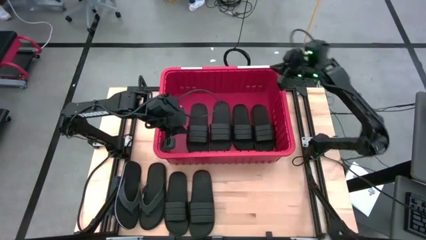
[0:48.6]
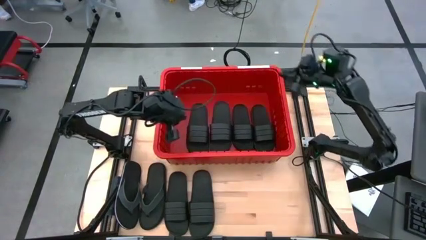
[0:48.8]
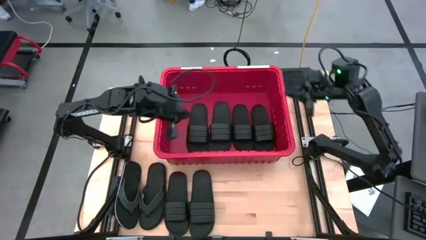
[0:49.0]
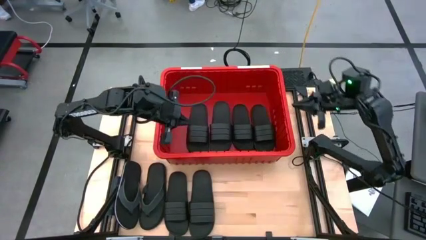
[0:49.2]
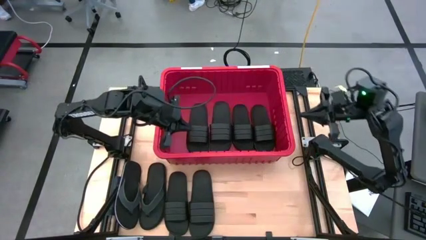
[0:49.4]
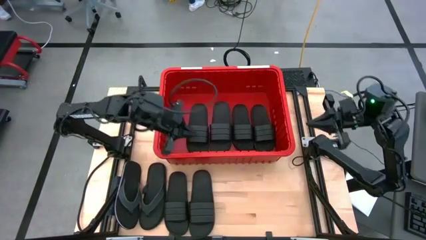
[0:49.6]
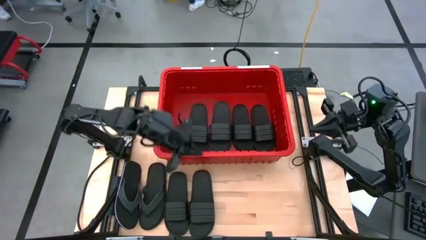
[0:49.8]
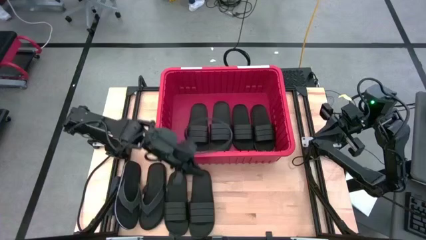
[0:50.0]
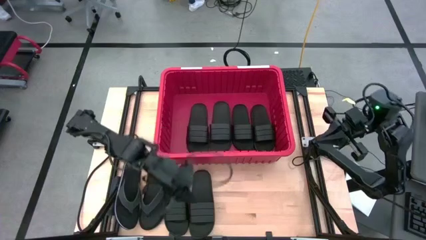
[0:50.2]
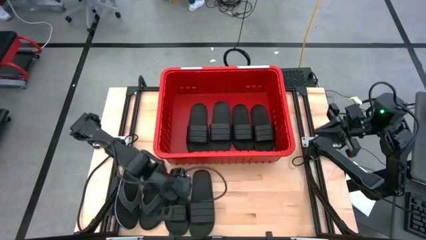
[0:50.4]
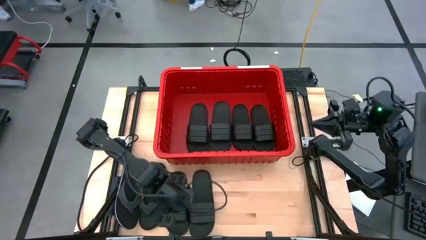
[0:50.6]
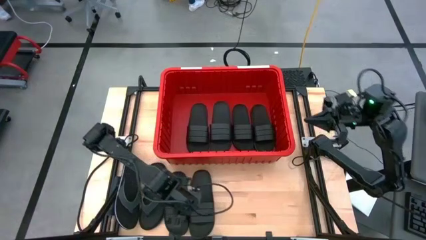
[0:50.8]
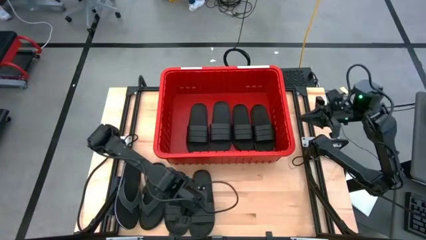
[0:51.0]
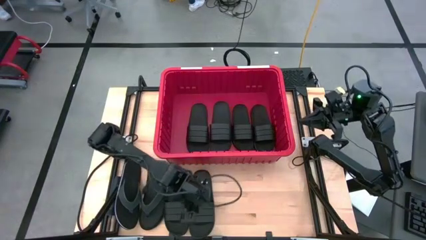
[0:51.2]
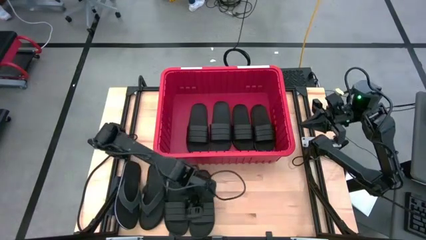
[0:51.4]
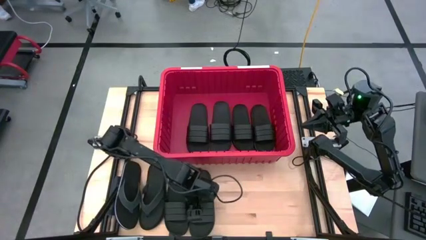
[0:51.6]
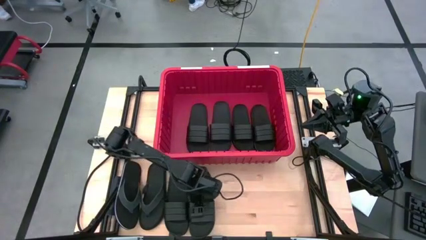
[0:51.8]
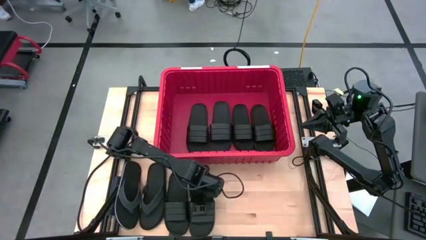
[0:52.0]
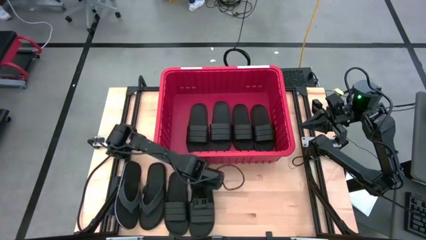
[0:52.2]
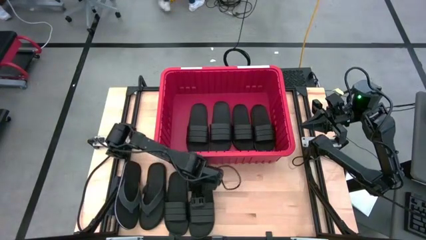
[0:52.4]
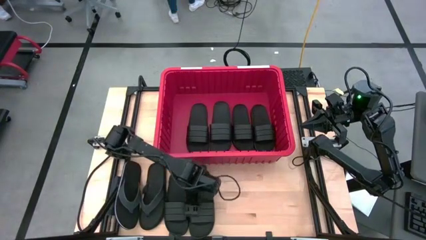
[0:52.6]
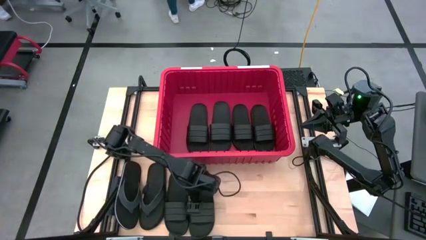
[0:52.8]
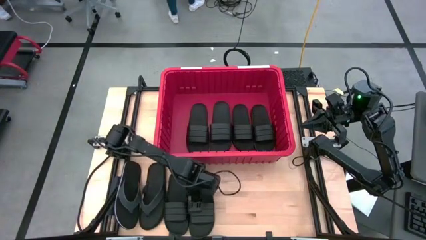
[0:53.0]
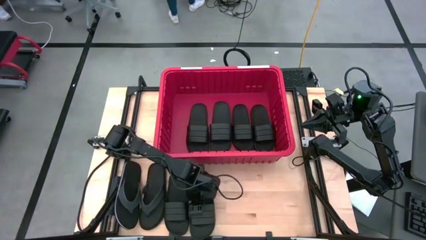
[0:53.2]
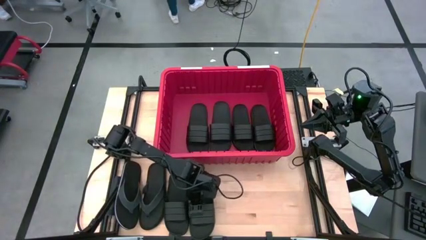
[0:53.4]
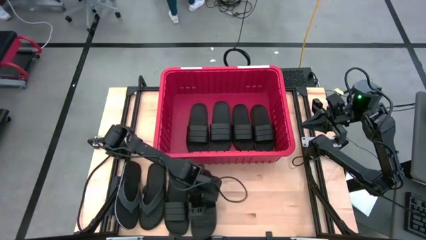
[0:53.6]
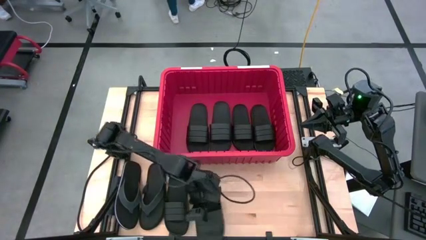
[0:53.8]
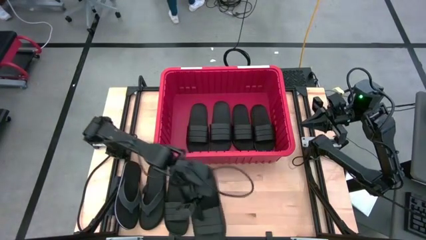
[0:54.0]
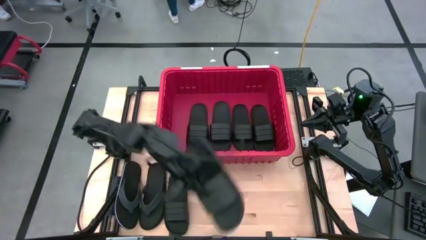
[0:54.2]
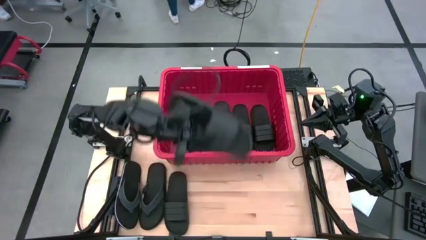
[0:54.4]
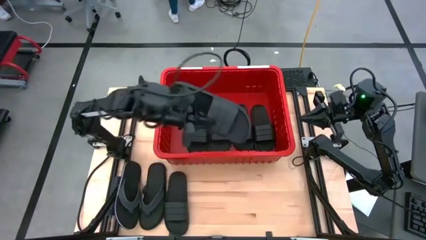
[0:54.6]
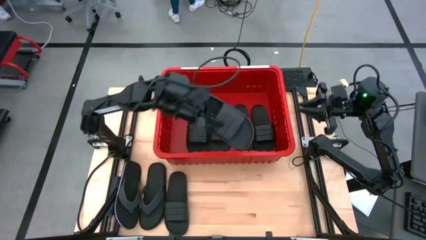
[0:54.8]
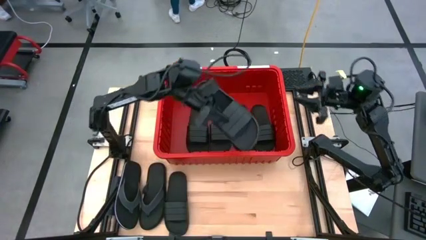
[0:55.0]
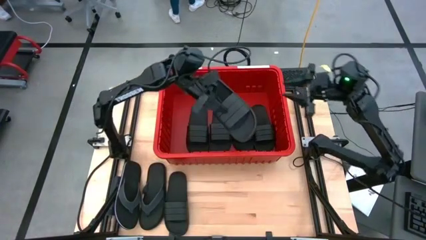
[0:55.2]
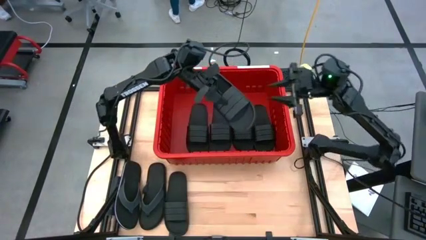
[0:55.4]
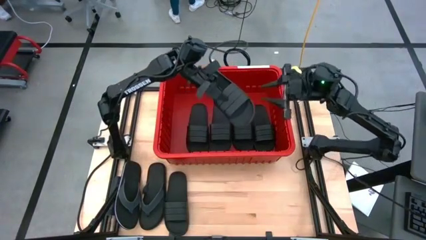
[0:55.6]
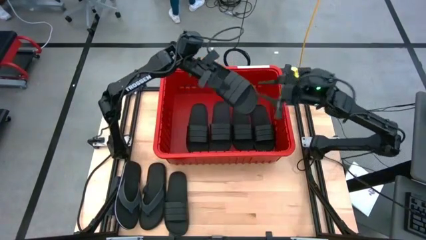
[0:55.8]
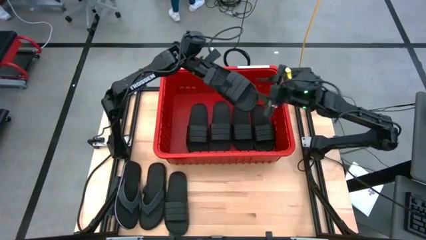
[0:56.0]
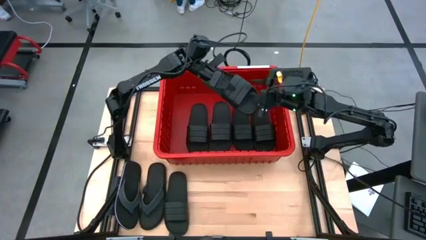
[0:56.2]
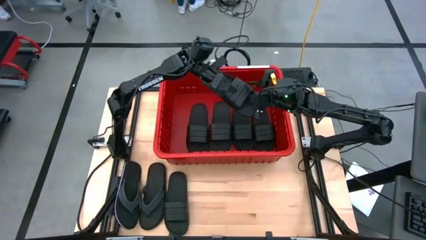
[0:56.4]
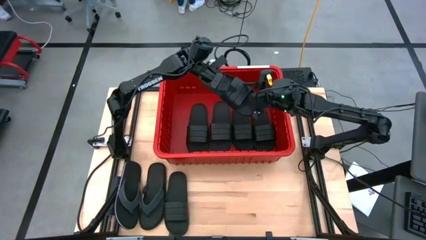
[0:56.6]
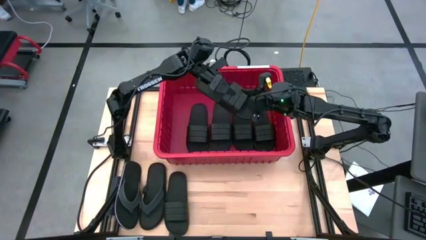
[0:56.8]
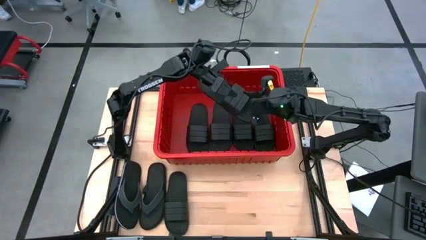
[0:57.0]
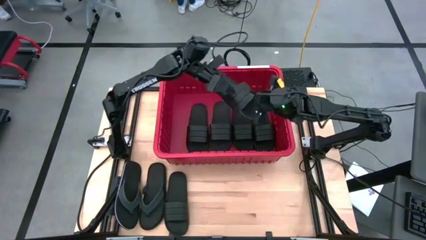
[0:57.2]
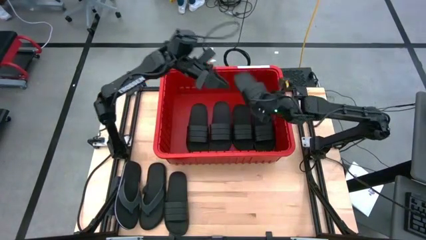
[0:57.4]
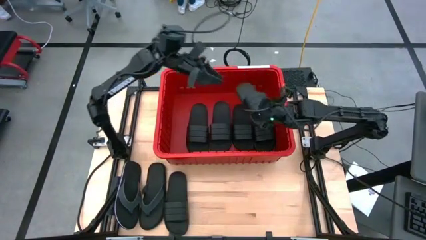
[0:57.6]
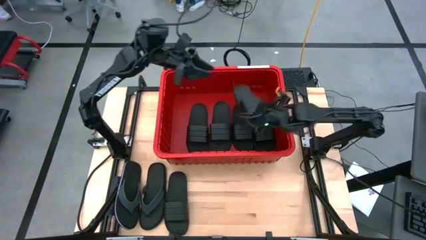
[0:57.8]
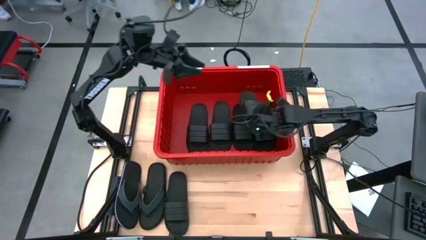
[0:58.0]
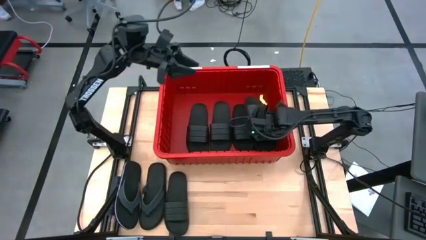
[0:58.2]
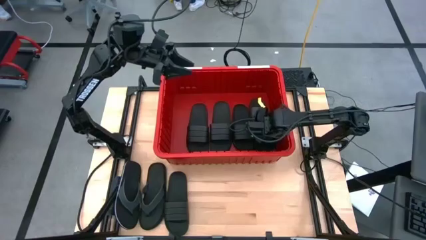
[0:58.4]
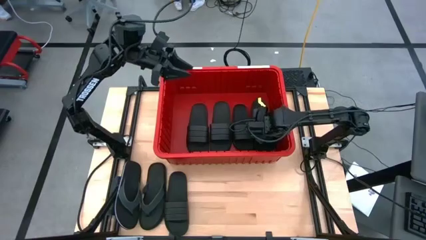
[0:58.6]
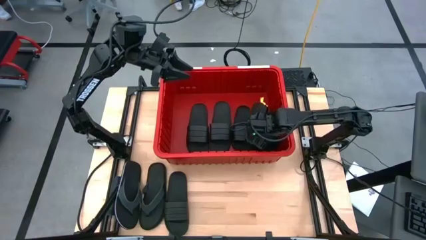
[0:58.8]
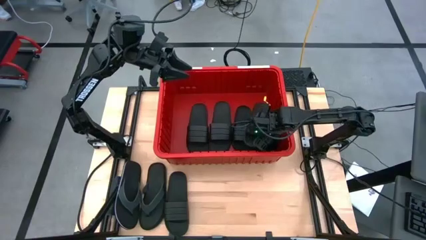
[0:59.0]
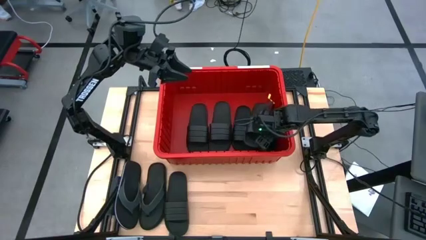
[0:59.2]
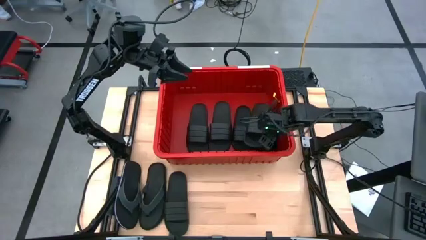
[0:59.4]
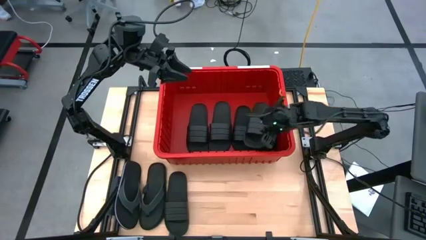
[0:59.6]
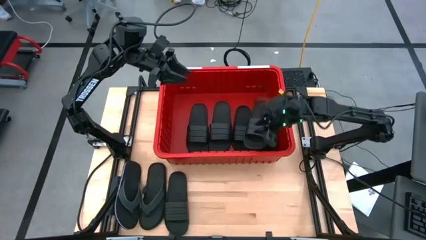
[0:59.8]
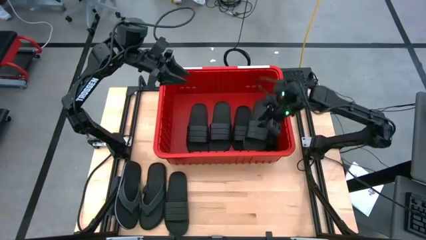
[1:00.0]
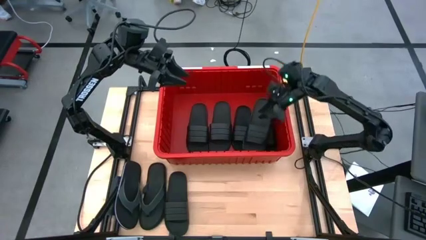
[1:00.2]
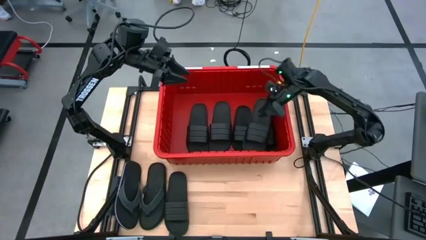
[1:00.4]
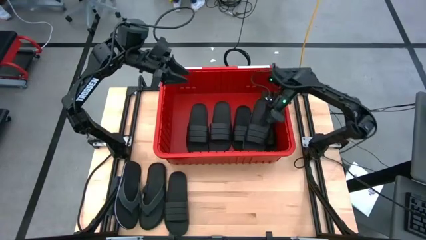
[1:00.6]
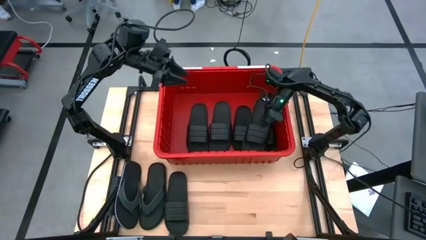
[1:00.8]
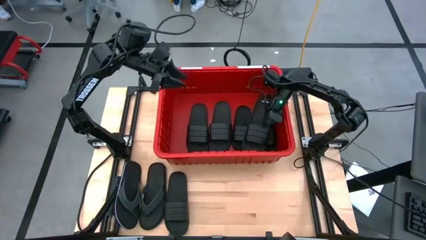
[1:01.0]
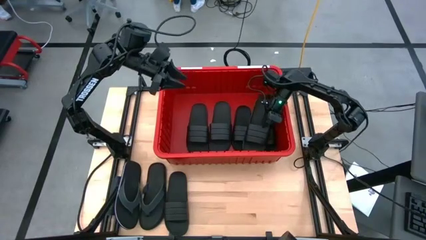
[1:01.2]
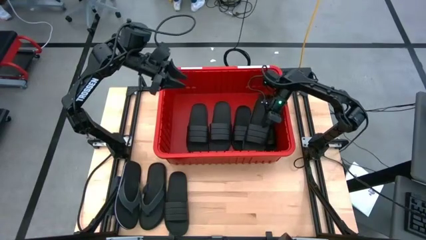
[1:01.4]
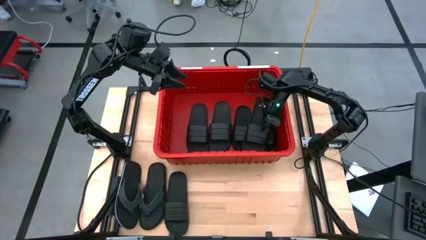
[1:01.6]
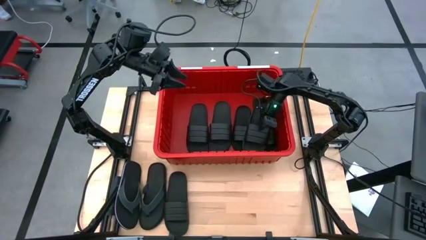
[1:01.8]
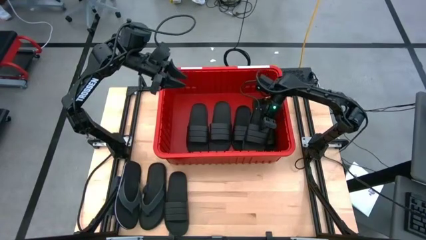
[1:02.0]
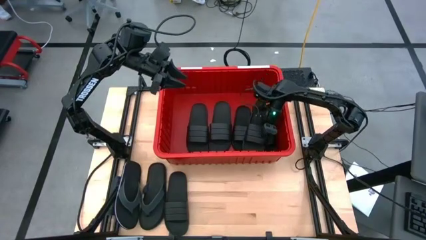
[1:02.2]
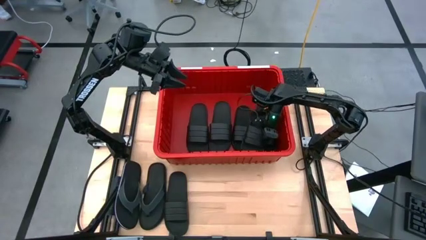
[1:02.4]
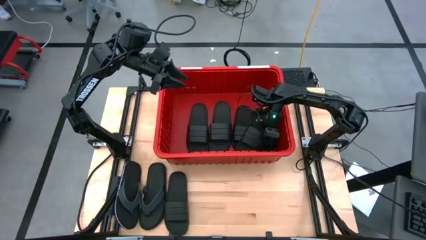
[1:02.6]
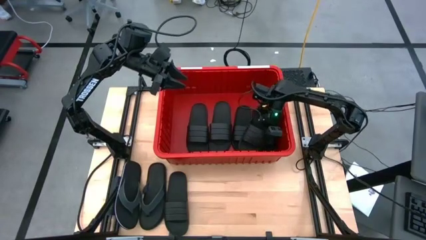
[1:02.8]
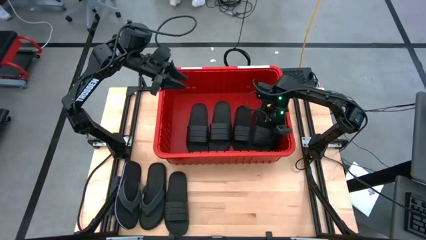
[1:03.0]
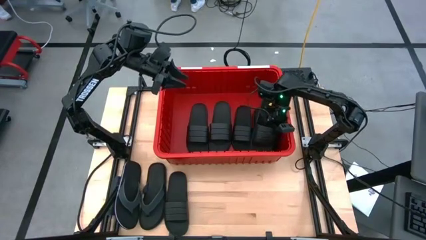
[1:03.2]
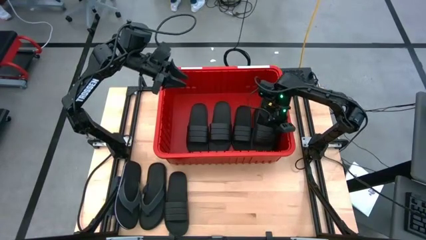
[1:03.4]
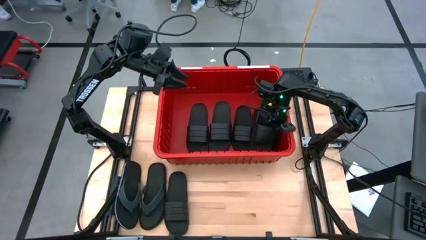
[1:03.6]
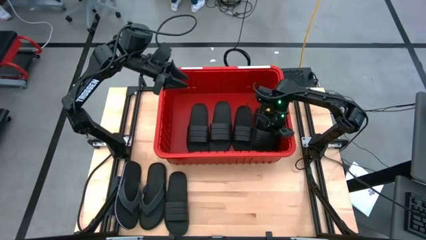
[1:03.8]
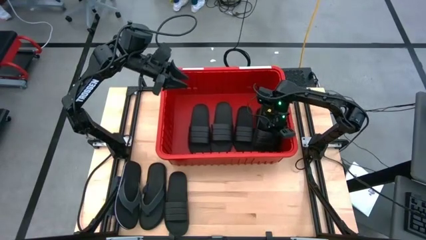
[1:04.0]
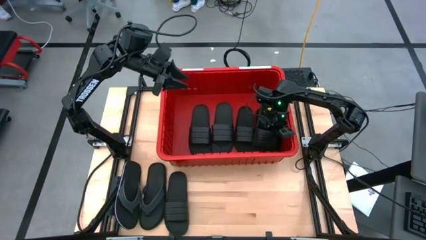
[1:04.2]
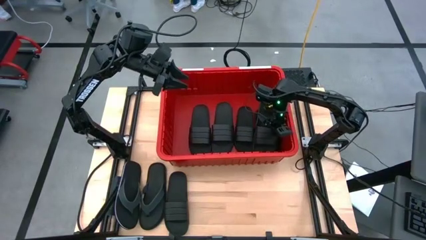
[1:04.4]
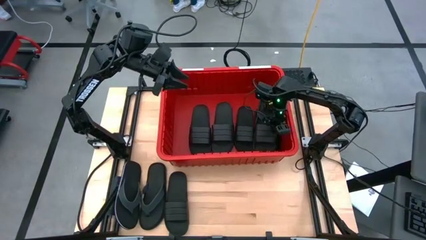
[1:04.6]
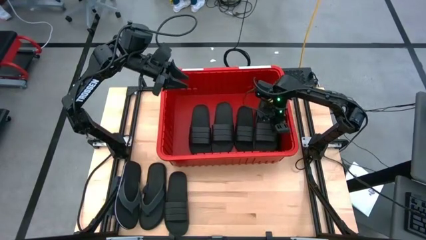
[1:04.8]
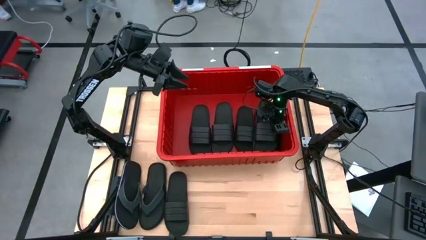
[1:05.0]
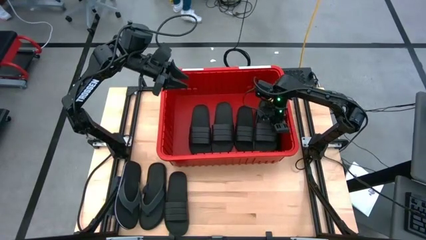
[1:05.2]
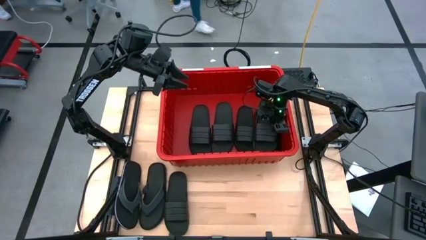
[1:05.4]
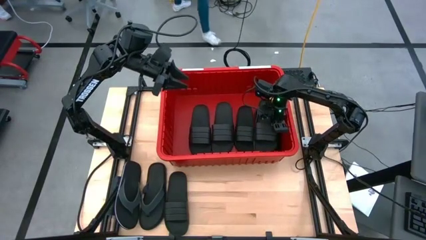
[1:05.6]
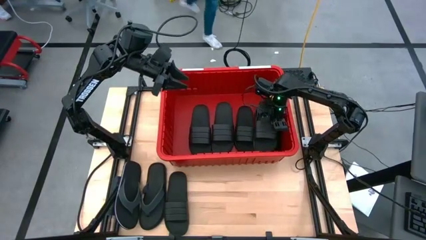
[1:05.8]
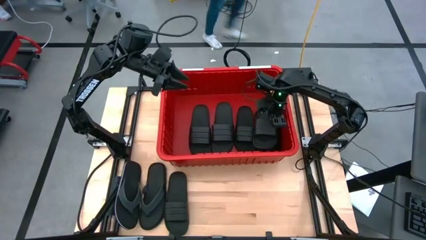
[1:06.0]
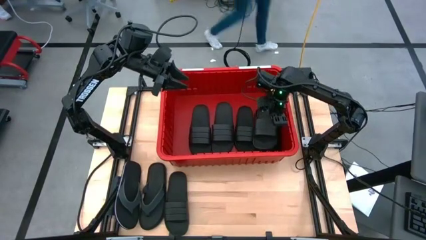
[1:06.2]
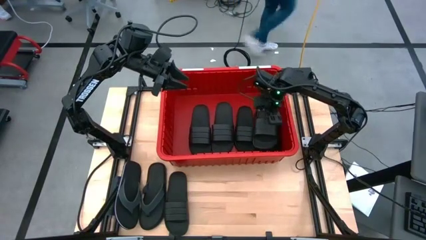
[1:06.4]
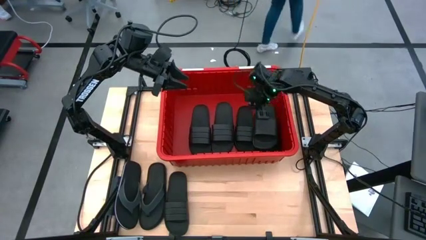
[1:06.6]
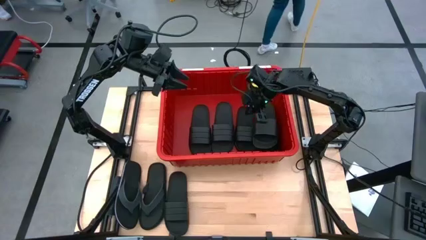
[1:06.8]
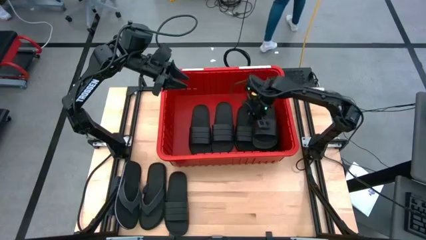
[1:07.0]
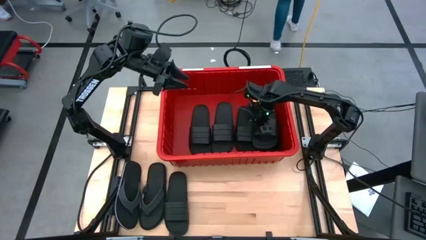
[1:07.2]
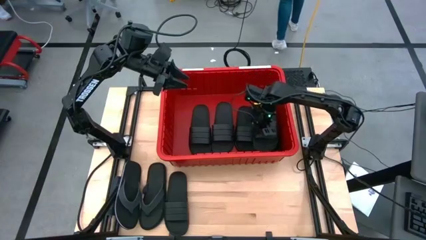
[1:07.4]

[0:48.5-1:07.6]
Task: Pick and place slides into bin
Put the black slide into the red bin
